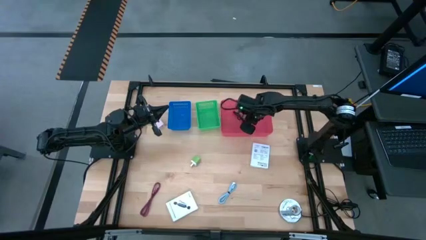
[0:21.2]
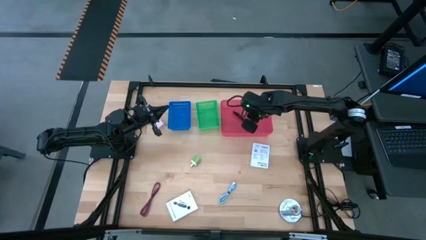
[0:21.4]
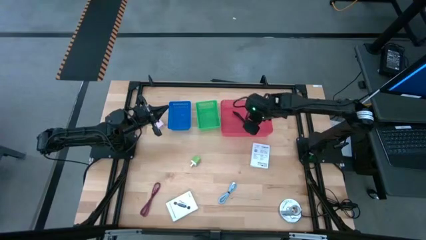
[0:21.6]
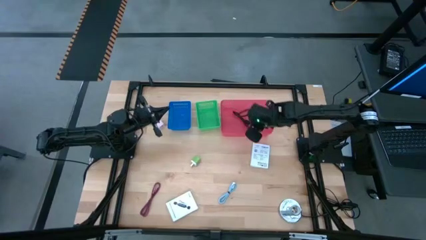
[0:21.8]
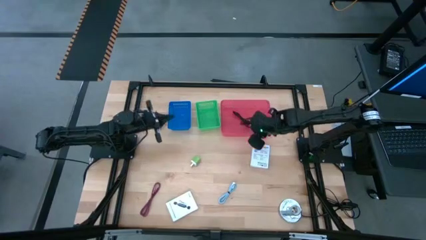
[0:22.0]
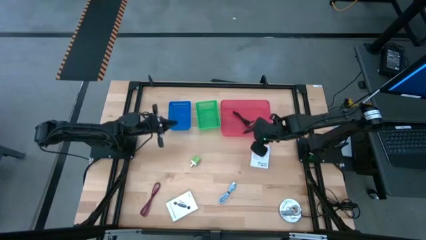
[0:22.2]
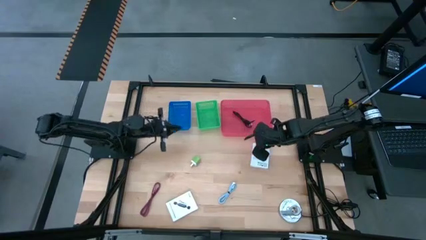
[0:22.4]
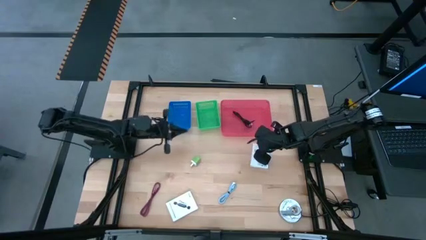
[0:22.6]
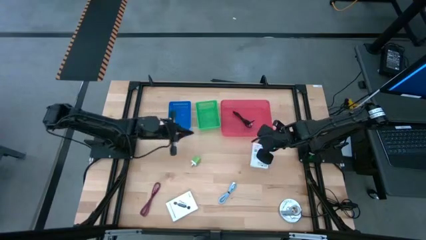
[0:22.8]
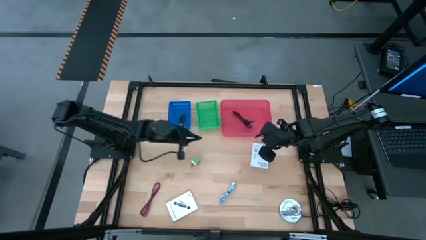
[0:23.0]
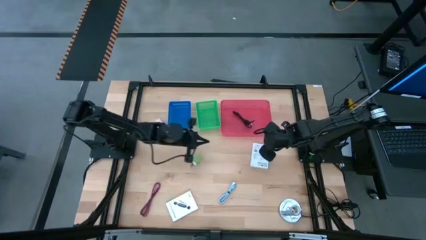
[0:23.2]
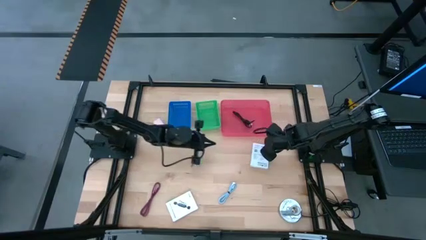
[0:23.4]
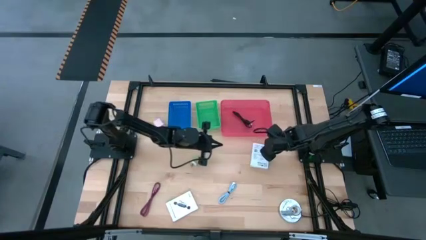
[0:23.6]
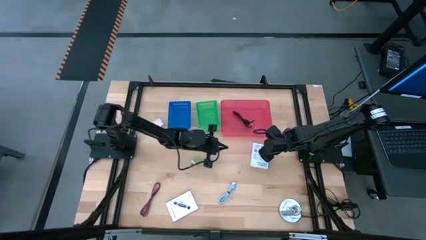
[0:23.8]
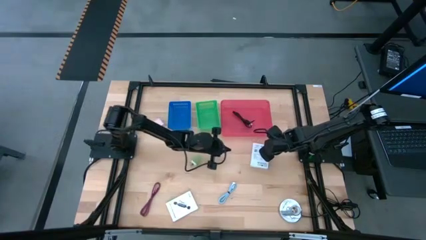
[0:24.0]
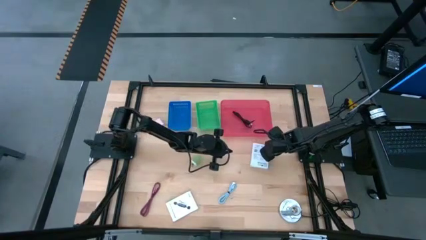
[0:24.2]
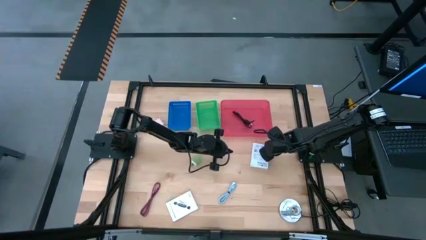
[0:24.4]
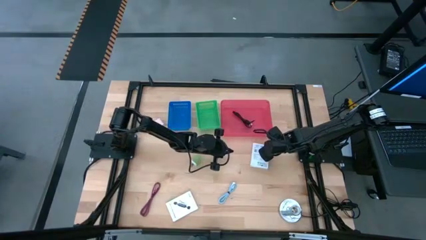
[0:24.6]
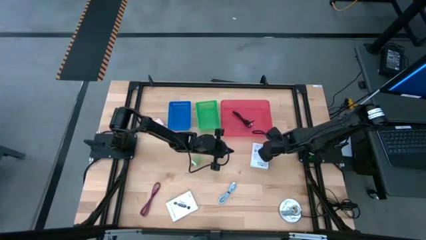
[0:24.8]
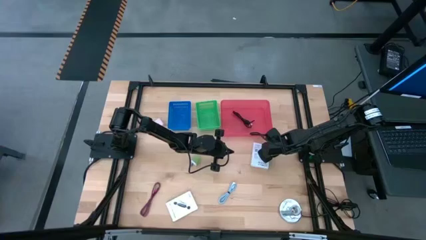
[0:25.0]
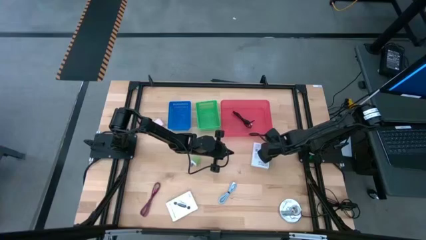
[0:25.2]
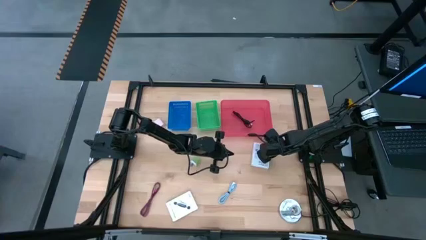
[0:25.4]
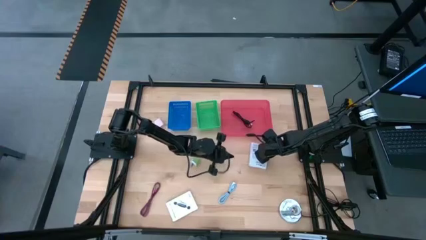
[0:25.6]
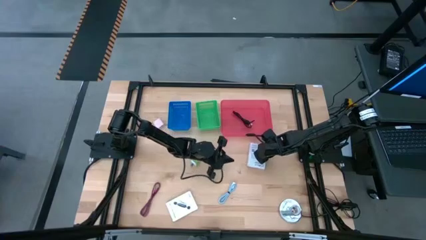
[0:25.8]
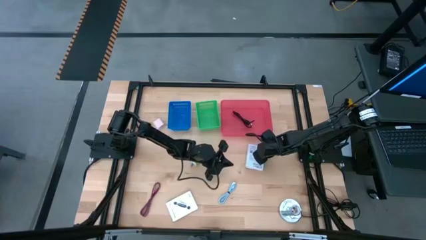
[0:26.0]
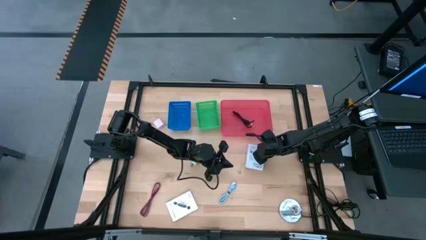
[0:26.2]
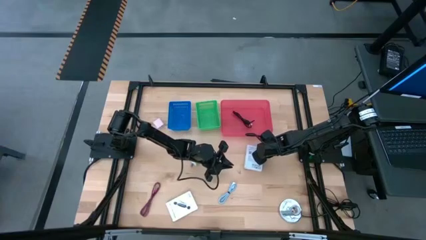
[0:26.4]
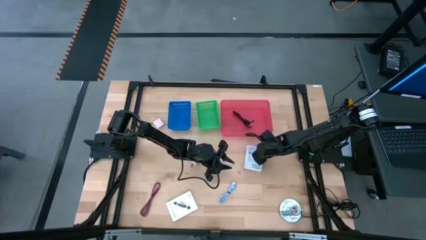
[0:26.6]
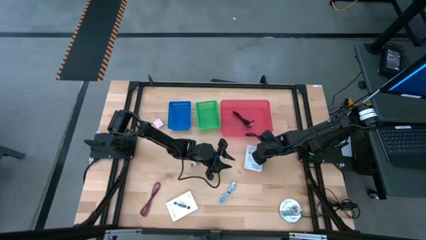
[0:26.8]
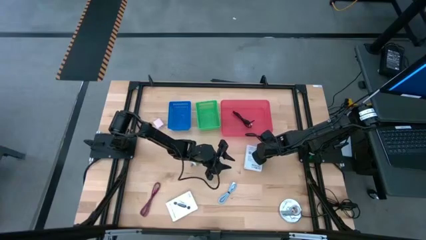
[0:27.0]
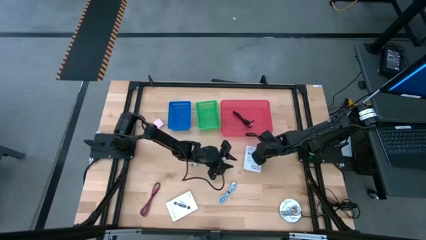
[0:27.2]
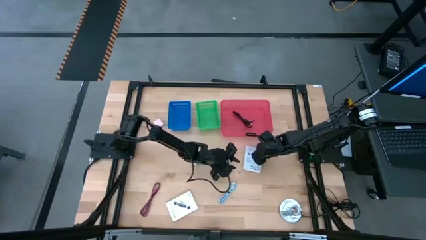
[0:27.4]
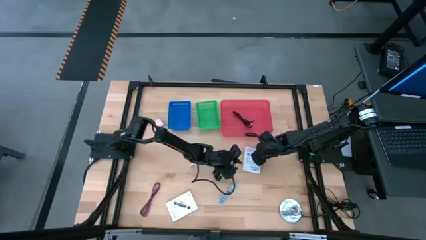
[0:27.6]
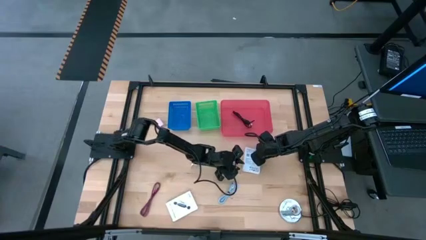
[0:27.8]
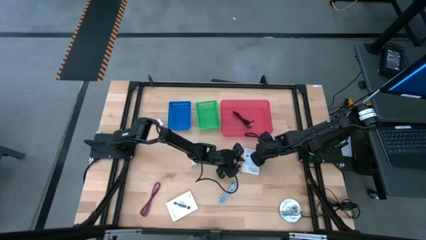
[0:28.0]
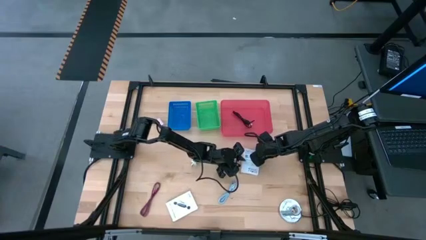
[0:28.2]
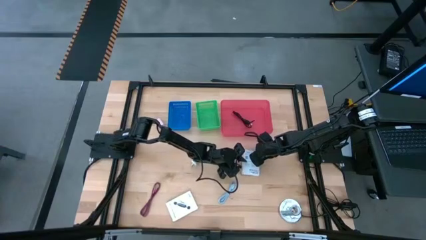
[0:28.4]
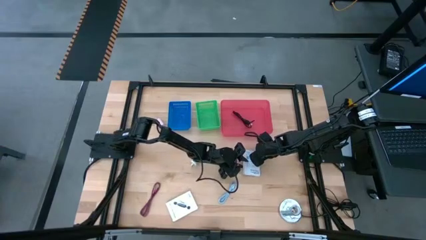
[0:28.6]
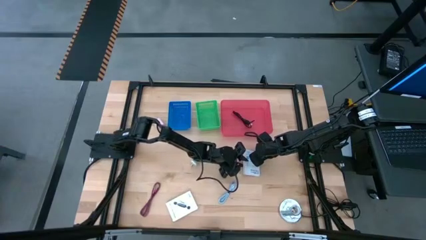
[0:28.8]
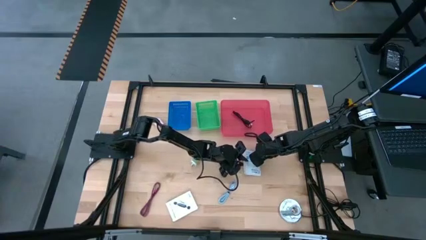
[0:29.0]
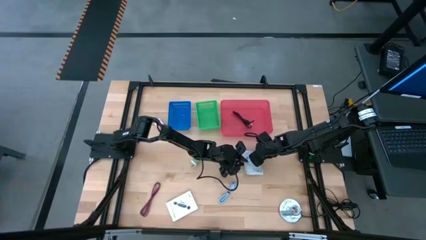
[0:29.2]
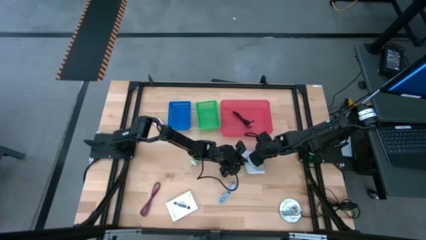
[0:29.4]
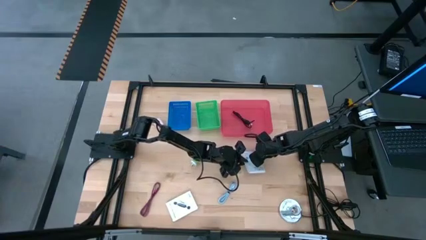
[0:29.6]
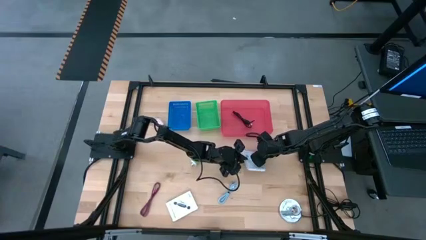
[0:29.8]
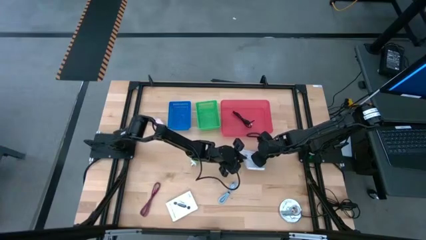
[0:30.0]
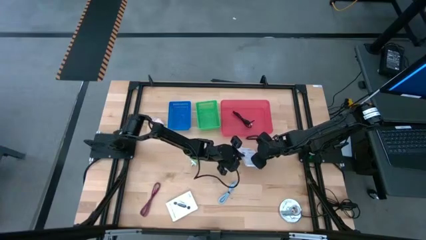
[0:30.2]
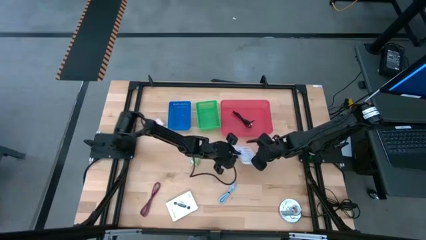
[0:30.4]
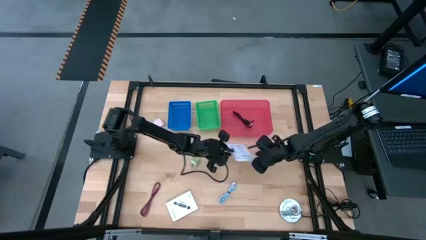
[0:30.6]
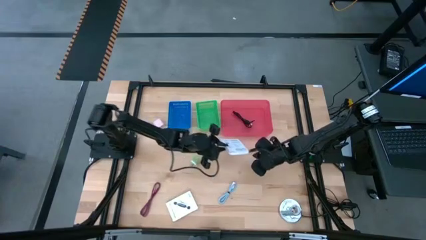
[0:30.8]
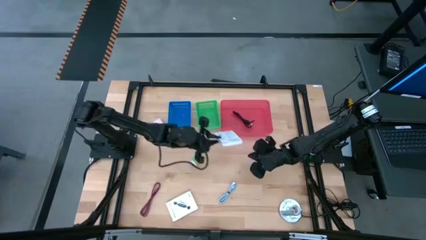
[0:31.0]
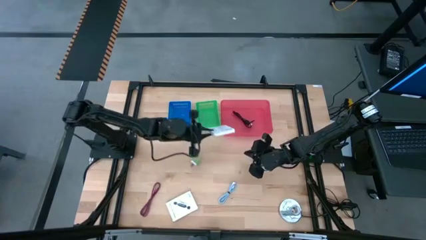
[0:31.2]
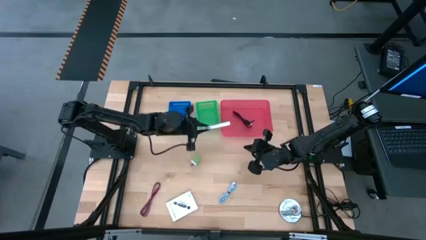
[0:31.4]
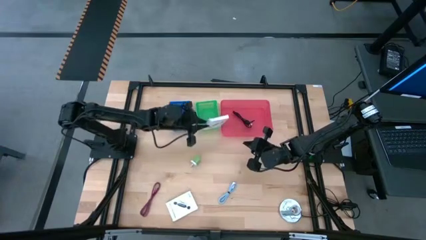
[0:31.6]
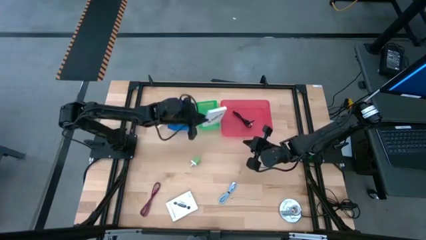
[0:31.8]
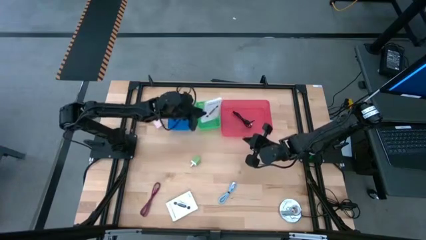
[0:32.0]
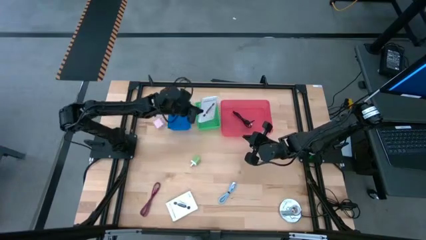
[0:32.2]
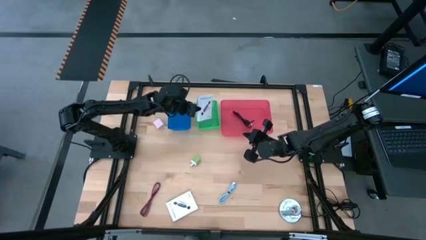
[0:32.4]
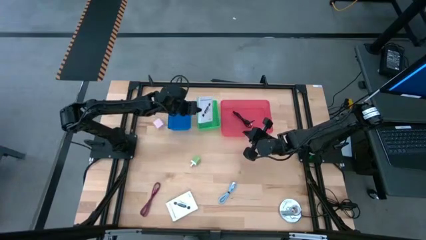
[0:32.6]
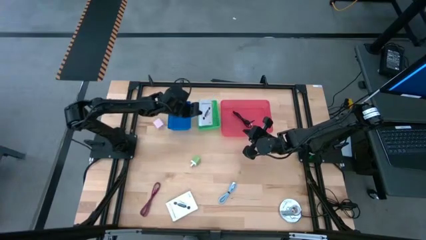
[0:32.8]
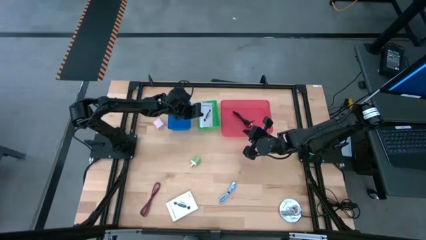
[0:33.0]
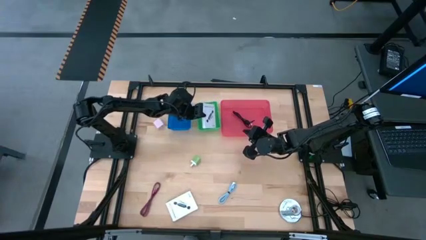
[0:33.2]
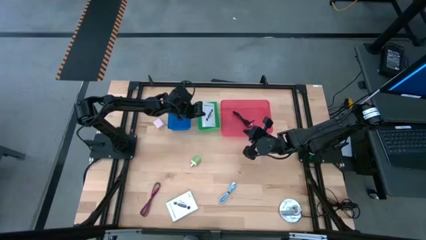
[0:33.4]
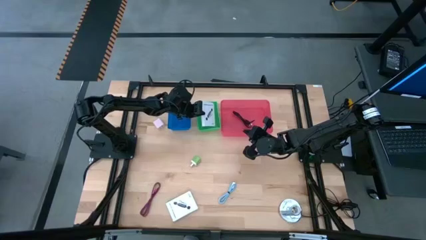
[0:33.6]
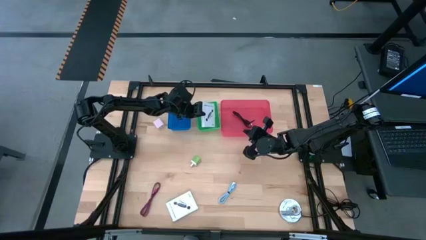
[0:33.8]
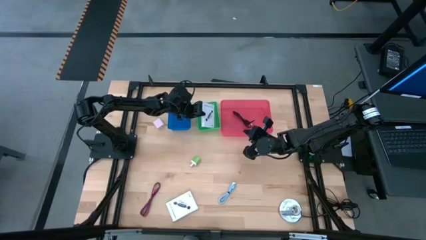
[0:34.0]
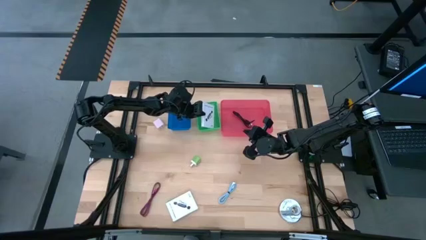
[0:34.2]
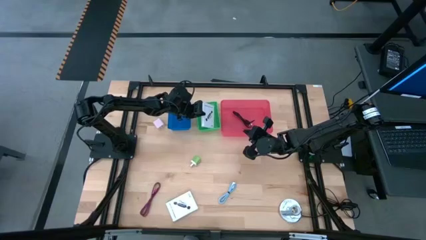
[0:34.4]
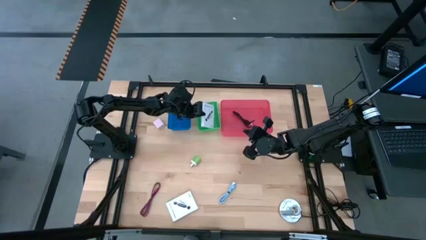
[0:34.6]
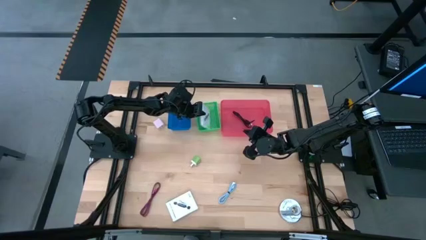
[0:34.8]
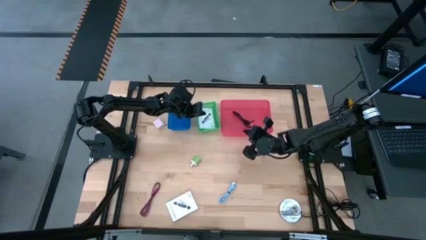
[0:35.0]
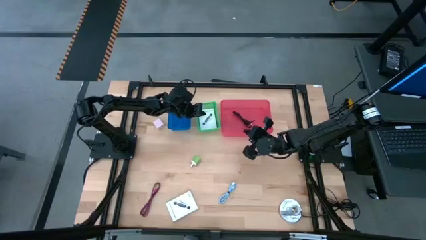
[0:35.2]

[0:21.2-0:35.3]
Task: Pick and place items into bin
Put the top card reader box into the green bin

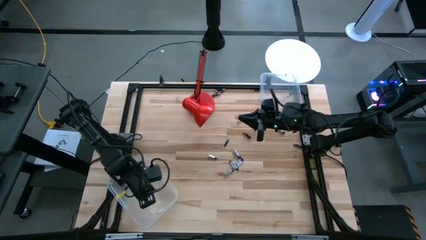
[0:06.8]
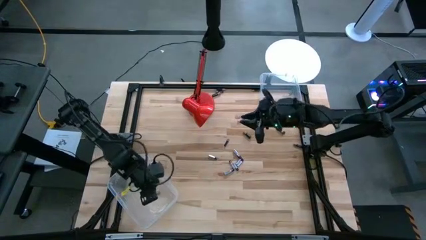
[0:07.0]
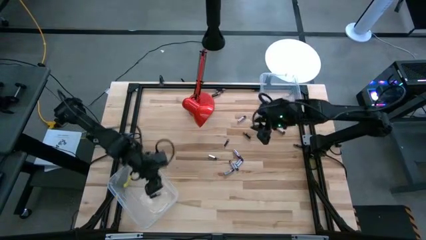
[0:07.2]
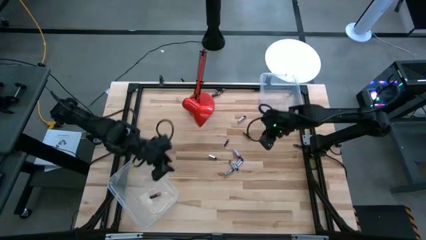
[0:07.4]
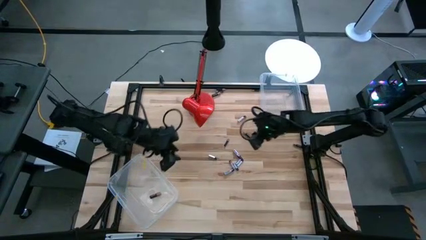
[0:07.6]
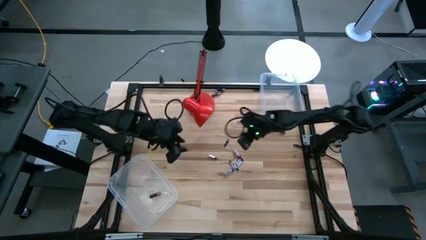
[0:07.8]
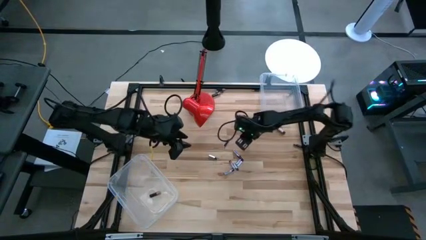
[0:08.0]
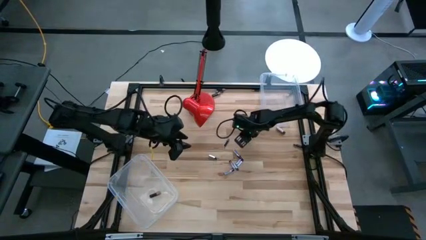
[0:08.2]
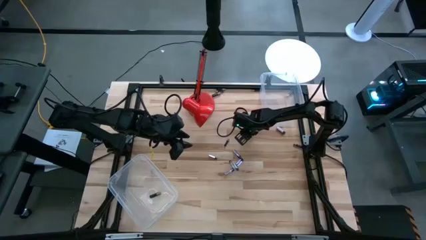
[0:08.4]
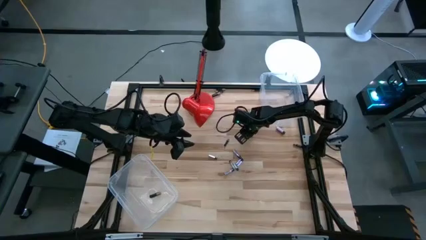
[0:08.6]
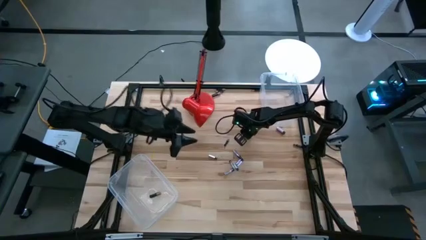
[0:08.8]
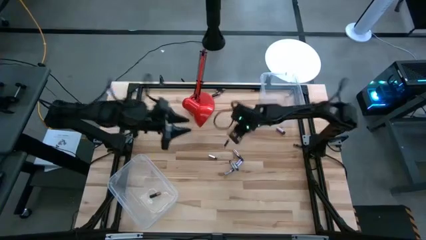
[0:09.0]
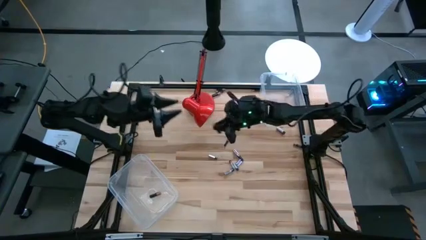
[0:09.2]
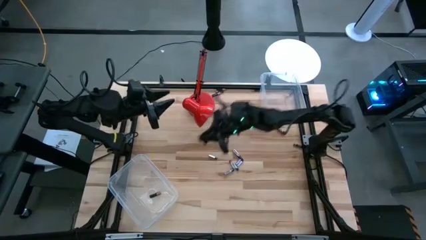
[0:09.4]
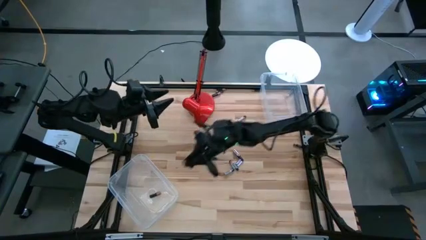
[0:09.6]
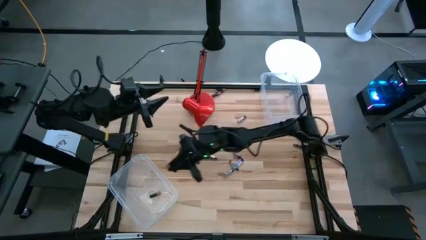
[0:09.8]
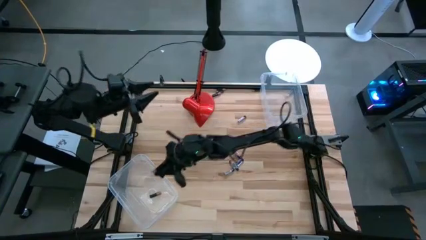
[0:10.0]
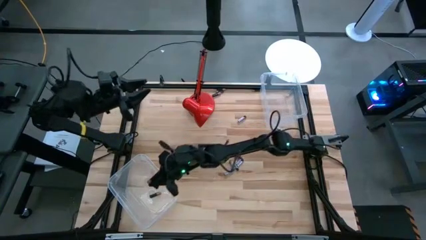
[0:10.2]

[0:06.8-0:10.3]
Task: Sort batteries
Put the black battery into the bottom transparent bin
